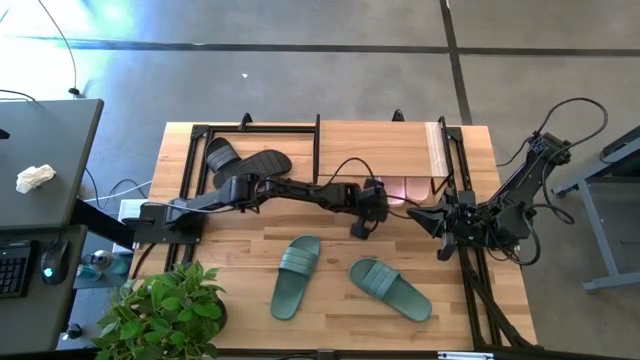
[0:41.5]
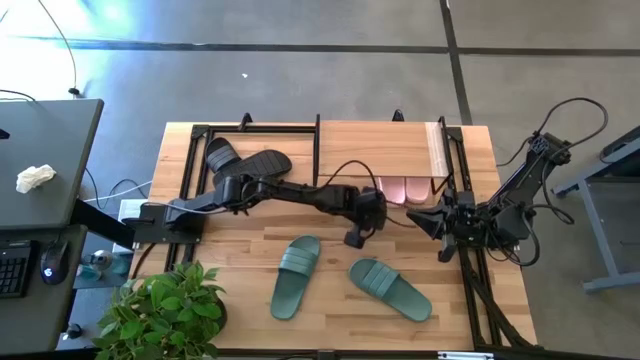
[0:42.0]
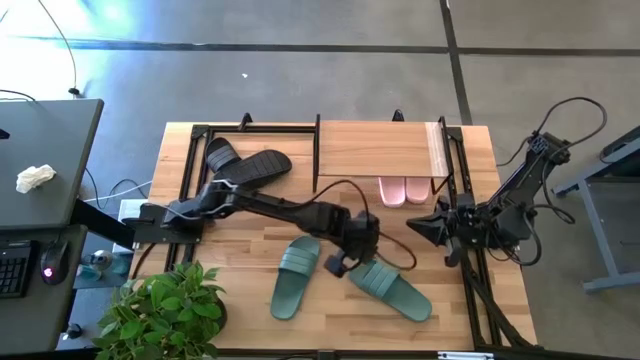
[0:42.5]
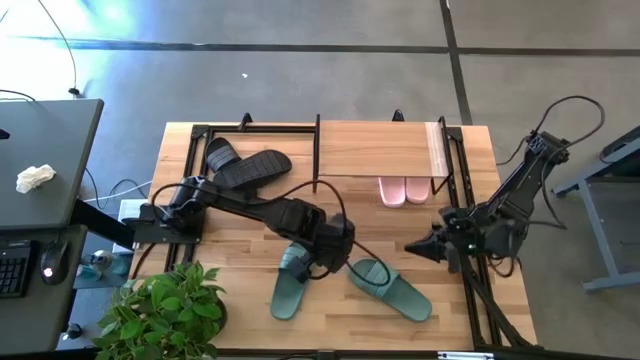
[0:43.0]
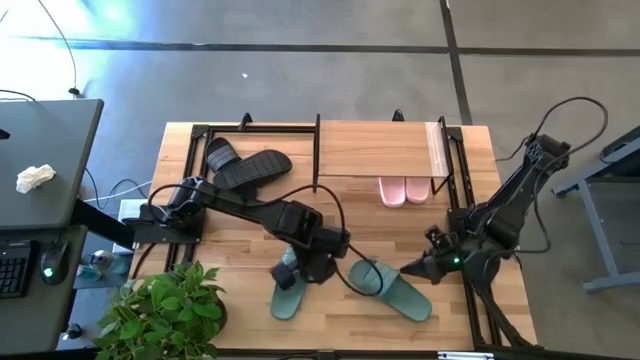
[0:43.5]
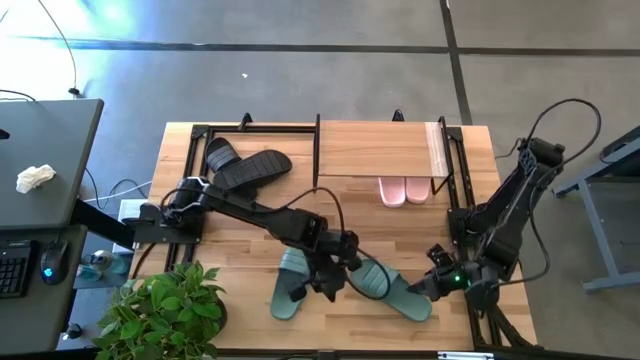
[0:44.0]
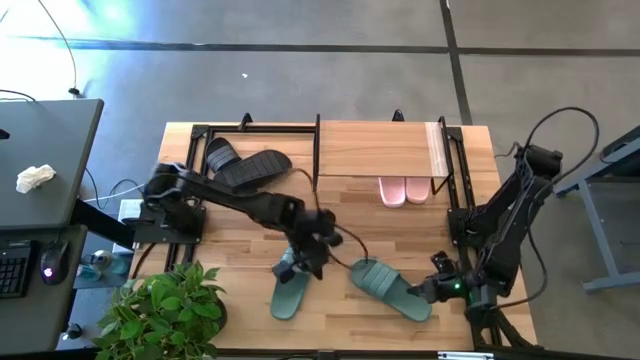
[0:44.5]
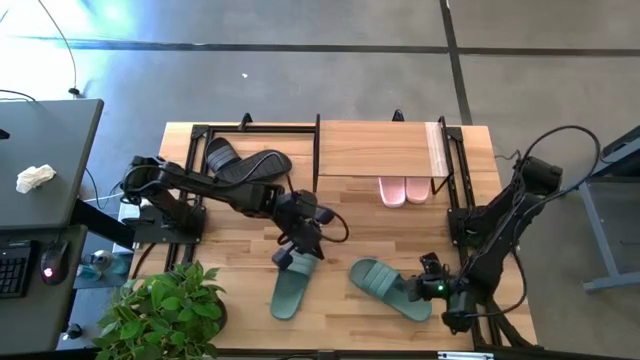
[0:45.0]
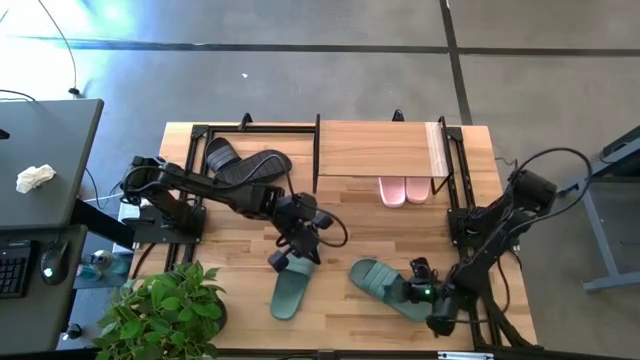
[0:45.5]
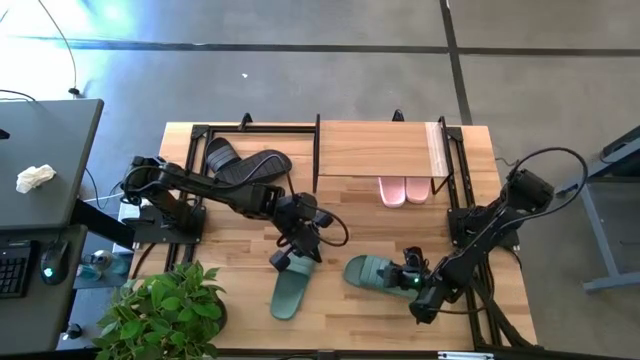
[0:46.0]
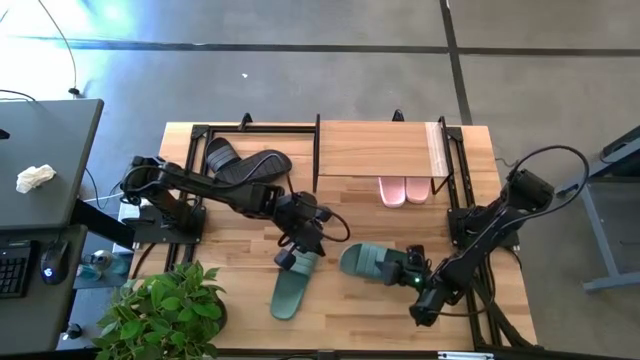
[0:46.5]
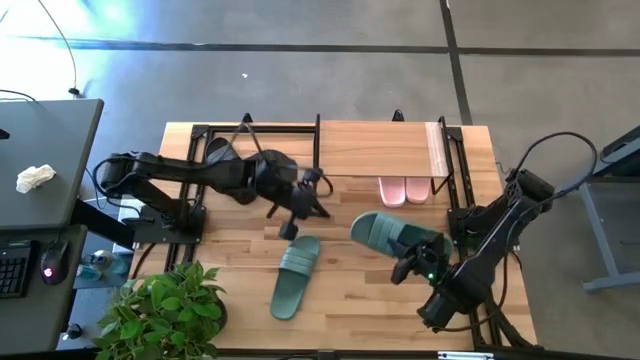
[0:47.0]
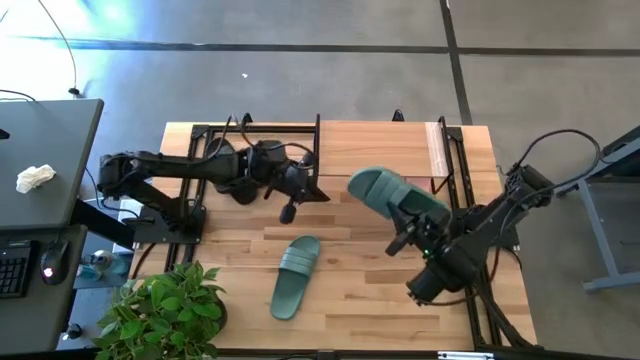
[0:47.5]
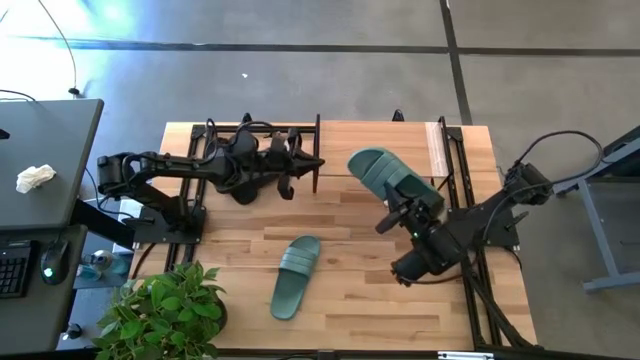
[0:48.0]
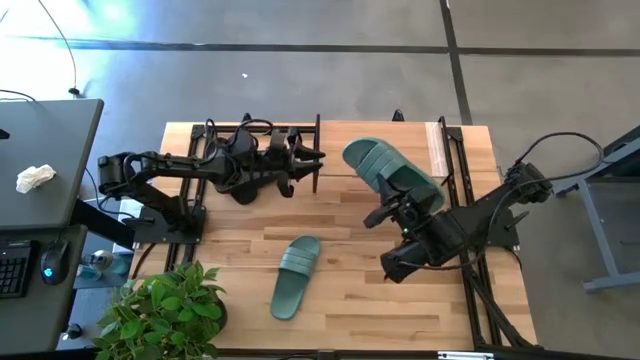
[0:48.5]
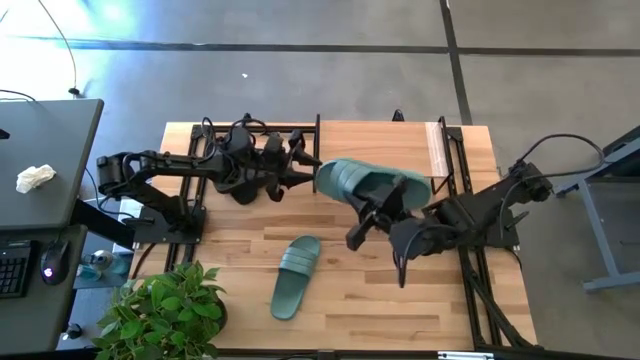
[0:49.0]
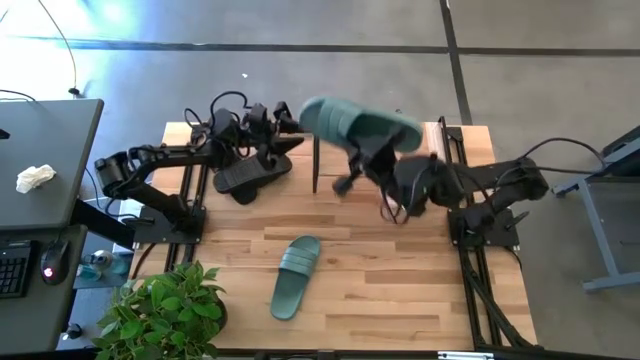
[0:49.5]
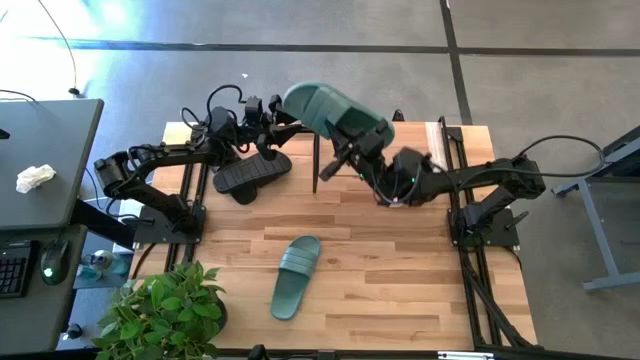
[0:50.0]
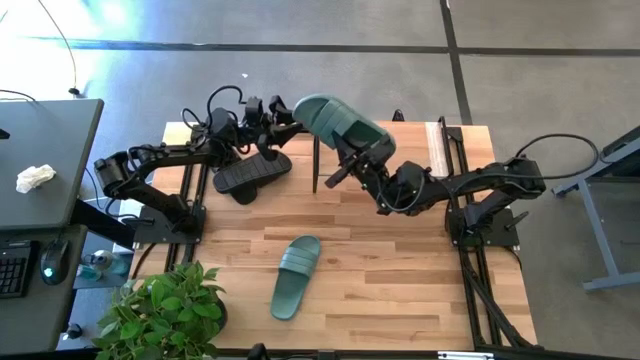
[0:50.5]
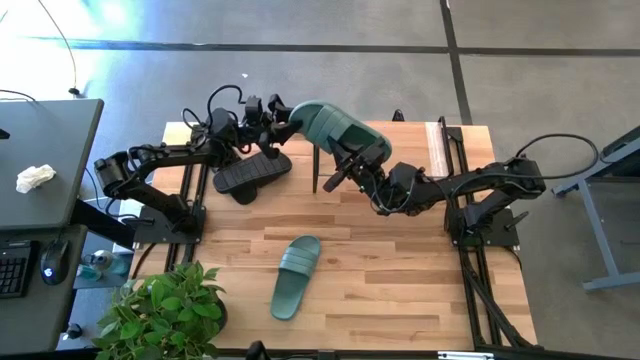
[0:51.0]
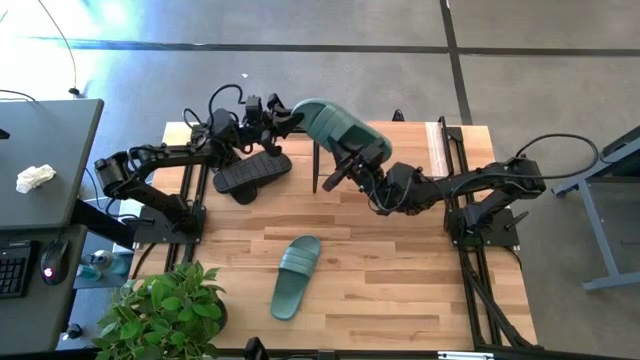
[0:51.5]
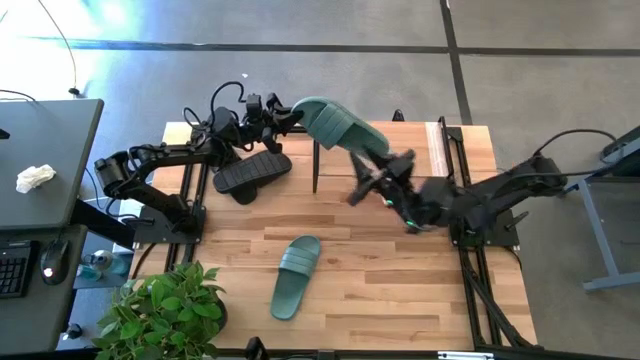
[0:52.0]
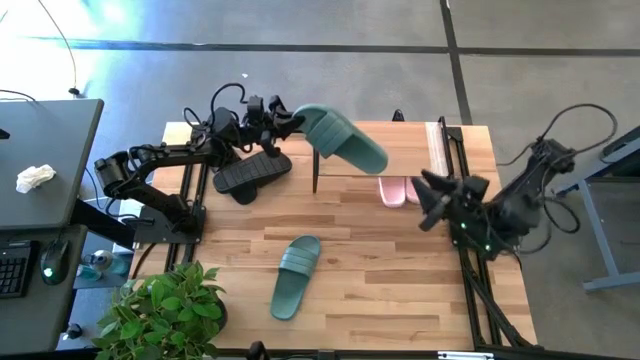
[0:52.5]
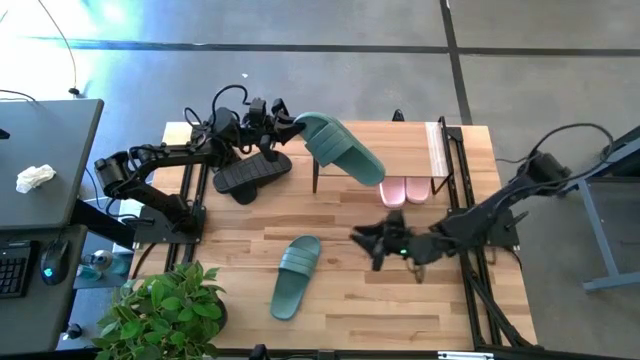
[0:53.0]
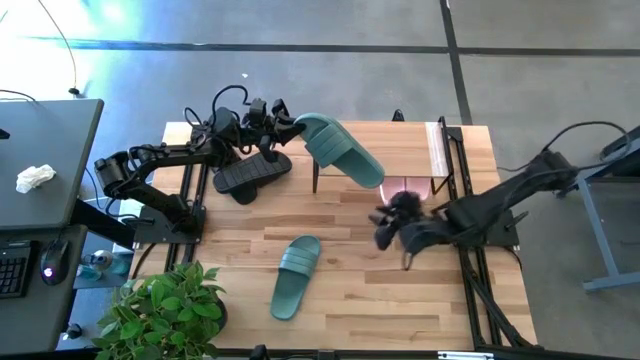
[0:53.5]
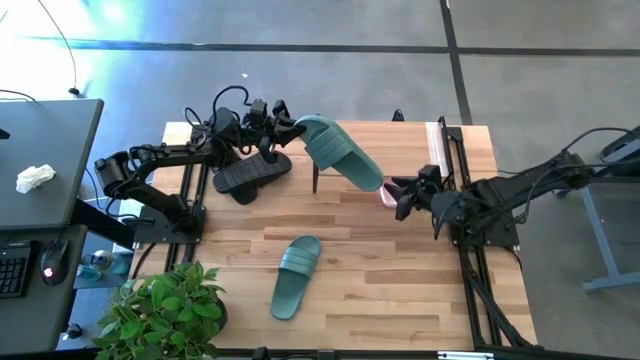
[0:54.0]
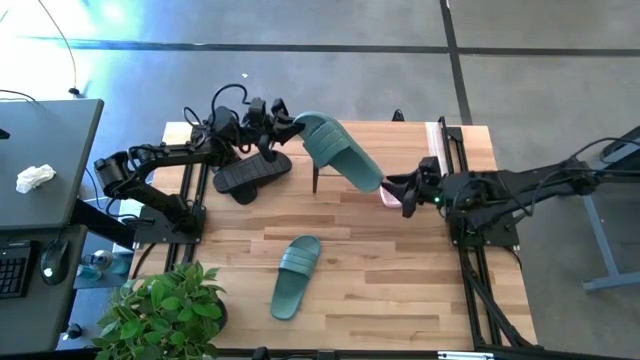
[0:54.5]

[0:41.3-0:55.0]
Task: Pick and place slides into the shelf
Put the right green slide under the shelf
